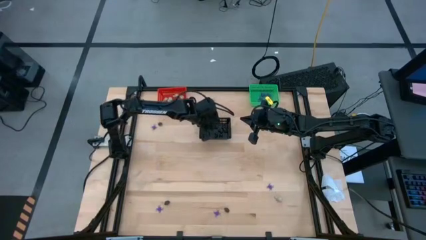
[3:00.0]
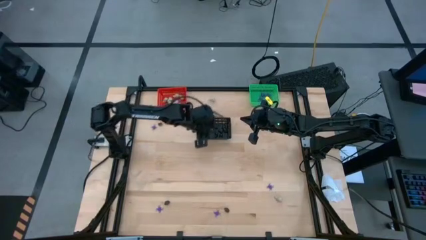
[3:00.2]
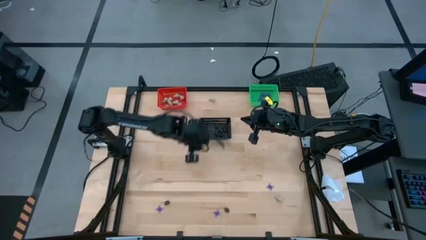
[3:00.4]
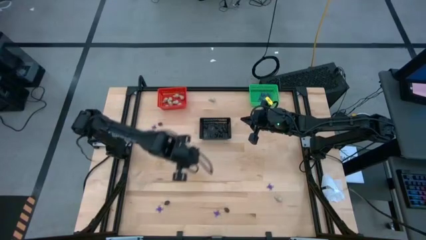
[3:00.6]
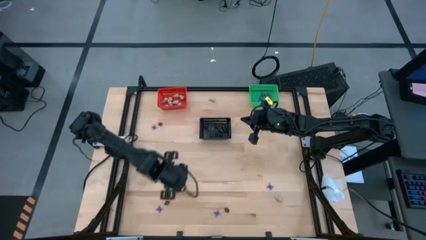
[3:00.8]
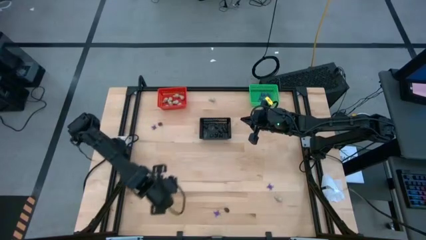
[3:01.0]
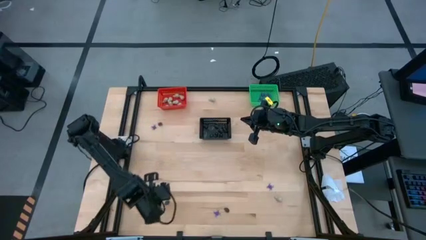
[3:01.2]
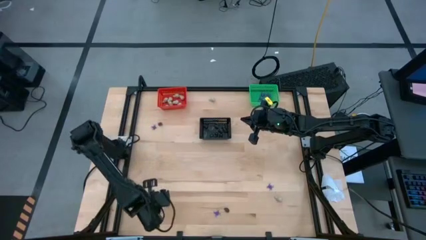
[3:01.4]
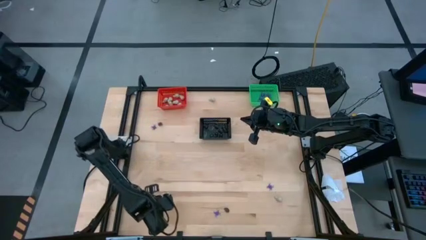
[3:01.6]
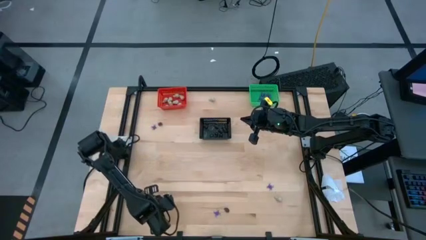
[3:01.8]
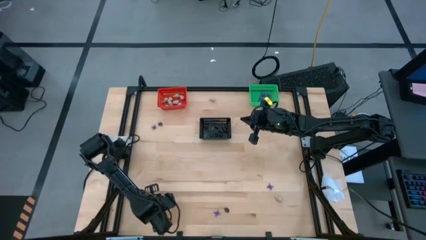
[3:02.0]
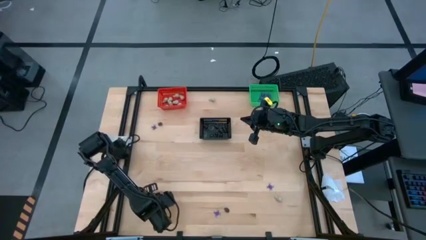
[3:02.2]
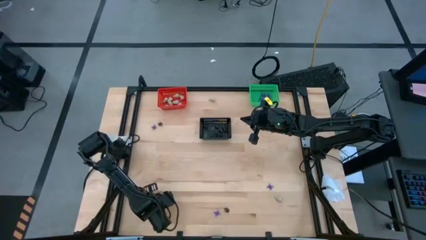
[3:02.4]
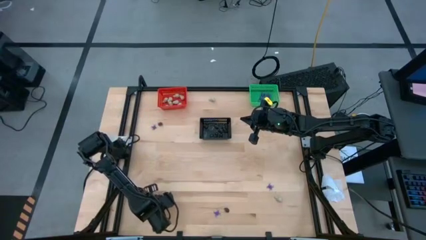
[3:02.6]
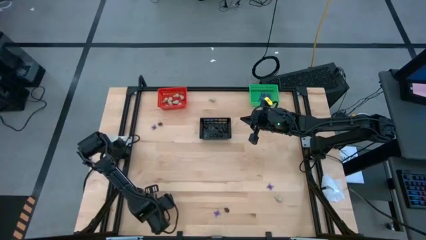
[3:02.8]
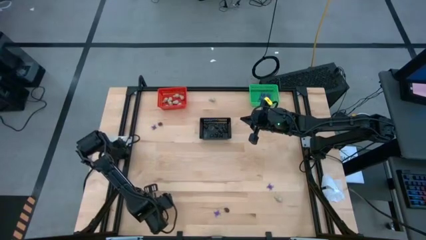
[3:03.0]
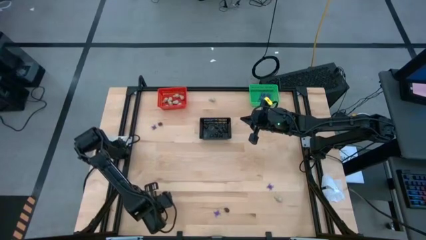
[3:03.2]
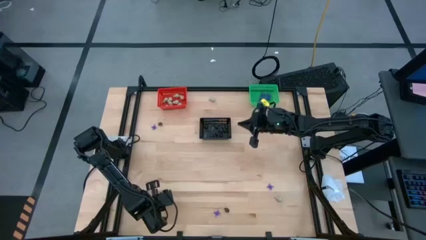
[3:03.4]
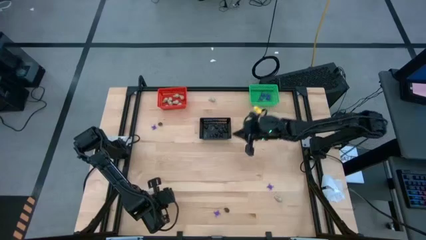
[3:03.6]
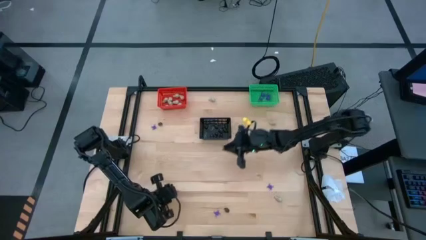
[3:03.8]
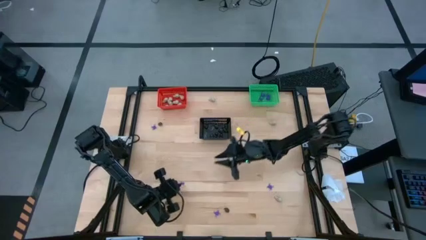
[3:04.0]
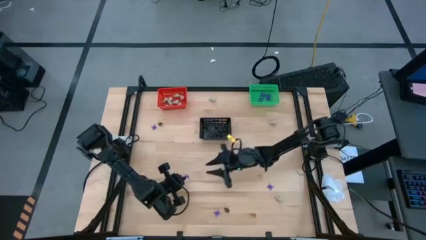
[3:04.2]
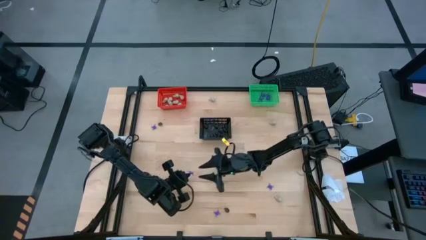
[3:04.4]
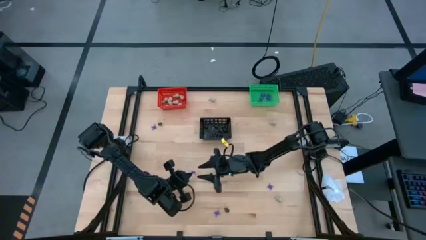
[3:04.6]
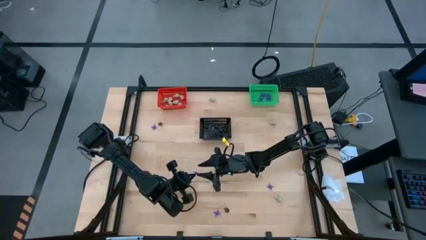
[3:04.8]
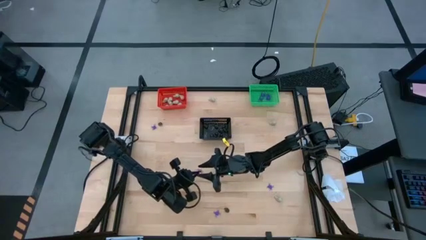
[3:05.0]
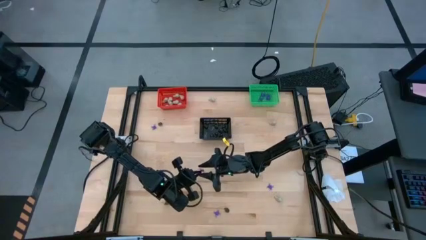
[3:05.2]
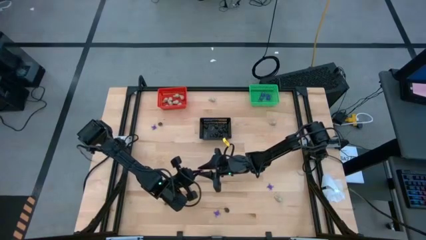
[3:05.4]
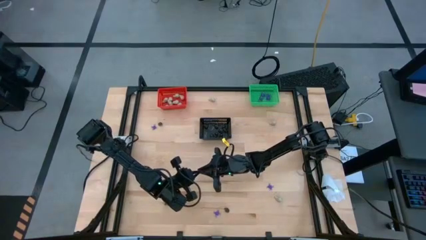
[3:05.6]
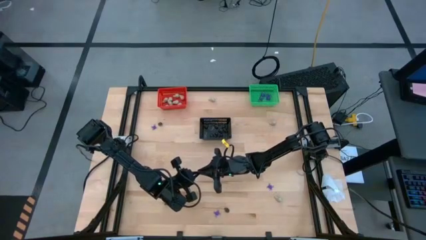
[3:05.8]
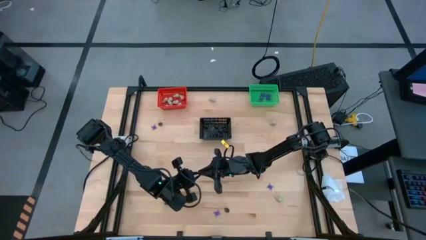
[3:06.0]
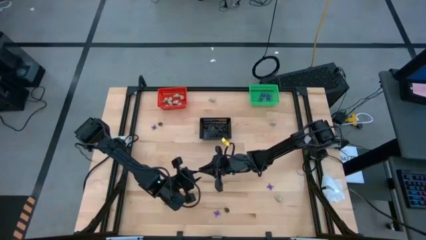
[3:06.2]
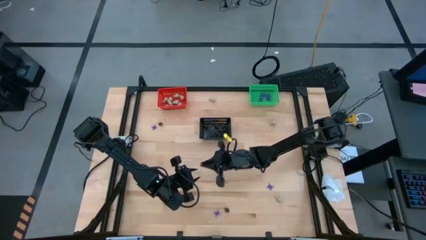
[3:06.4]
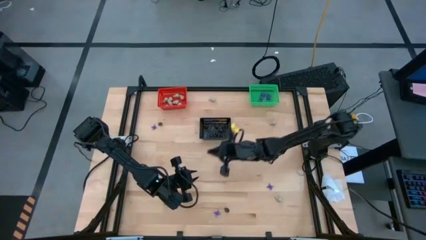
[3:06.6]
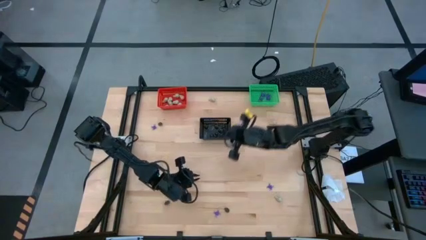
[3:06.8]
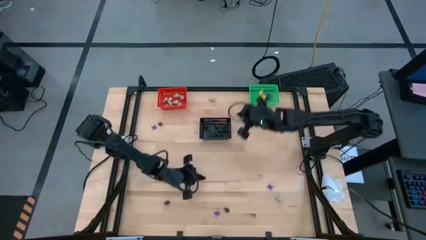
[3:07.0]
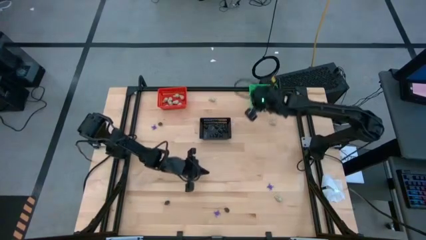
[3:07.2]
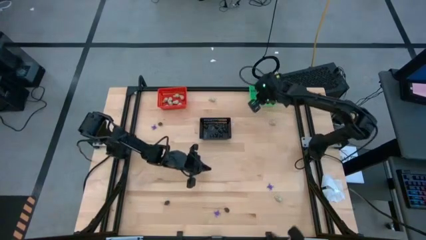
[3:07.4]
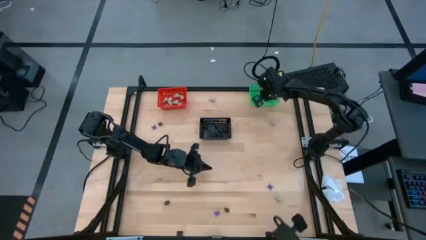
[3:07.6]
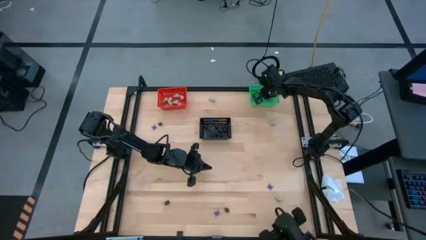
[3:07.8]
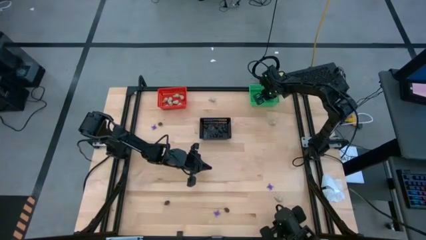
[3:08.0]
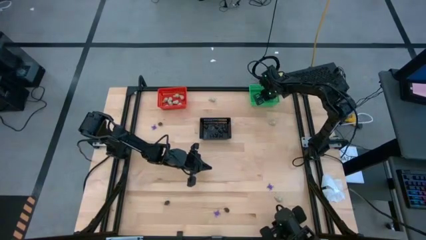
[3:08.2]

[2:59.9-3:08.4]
Task: Sort Halloween decoration
Put the violet spider toy into the green bin

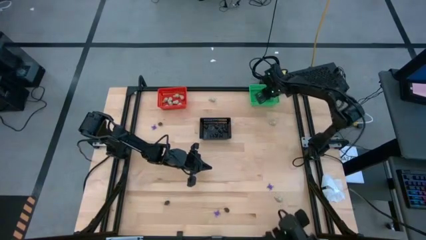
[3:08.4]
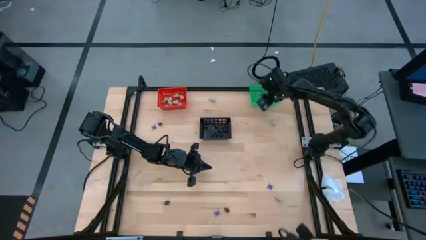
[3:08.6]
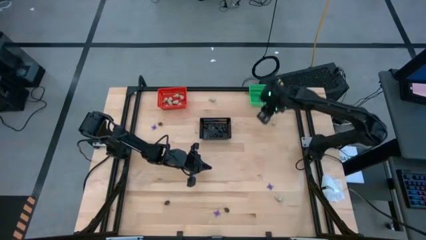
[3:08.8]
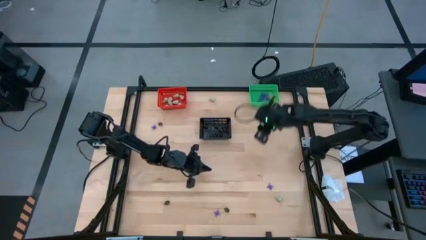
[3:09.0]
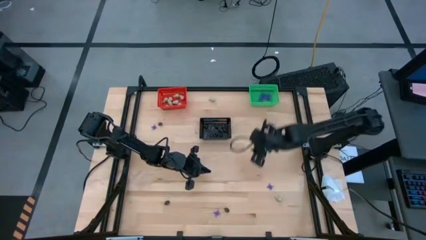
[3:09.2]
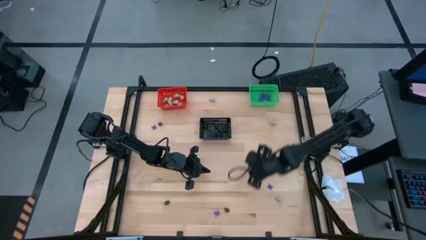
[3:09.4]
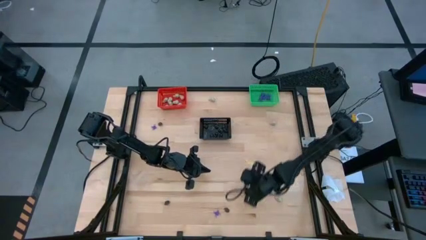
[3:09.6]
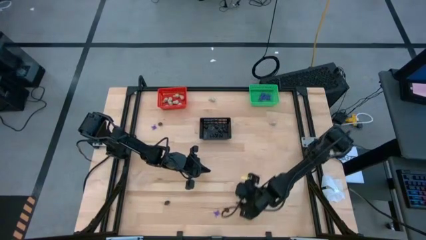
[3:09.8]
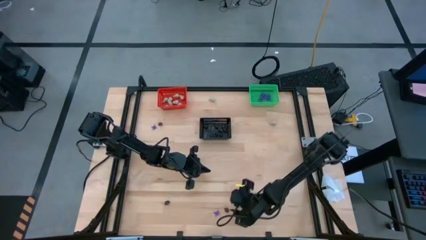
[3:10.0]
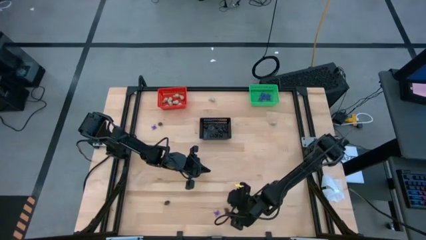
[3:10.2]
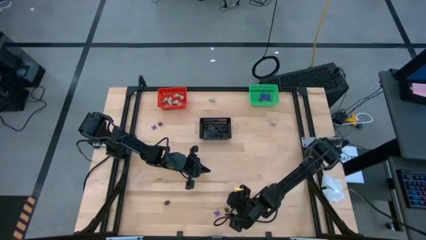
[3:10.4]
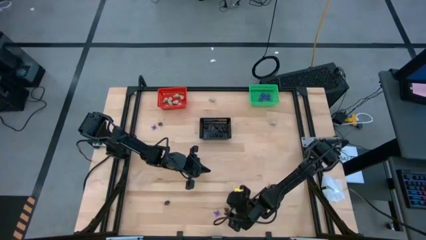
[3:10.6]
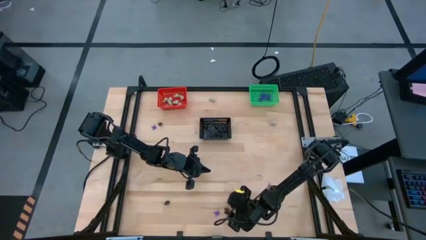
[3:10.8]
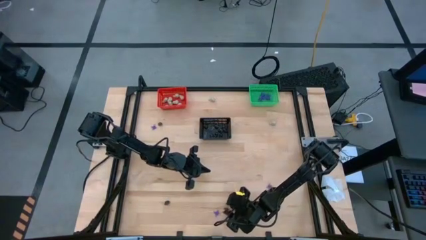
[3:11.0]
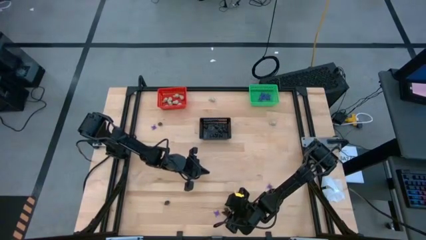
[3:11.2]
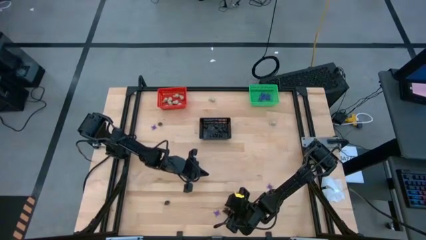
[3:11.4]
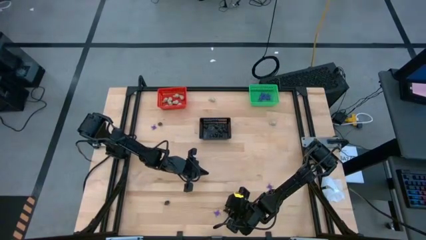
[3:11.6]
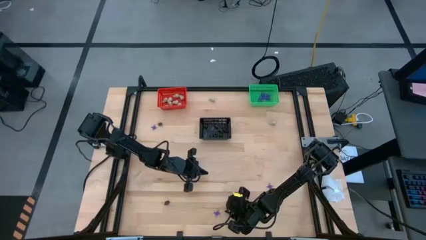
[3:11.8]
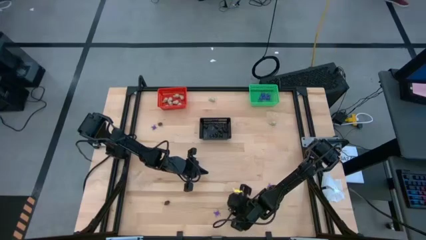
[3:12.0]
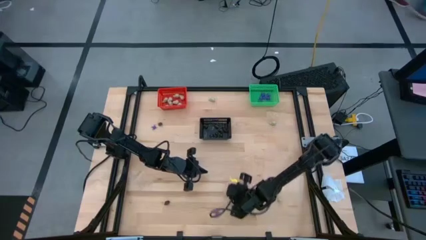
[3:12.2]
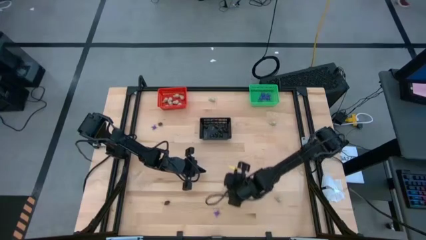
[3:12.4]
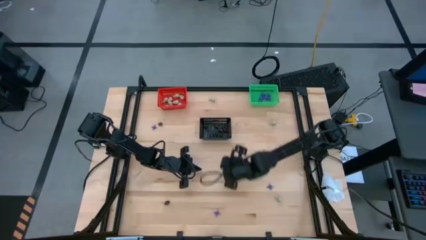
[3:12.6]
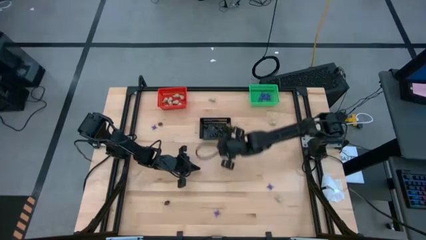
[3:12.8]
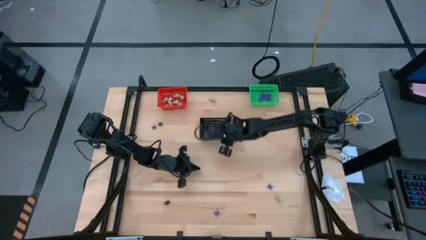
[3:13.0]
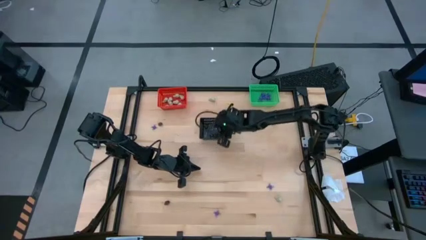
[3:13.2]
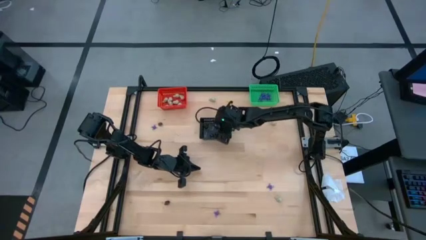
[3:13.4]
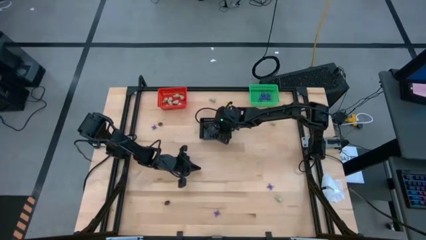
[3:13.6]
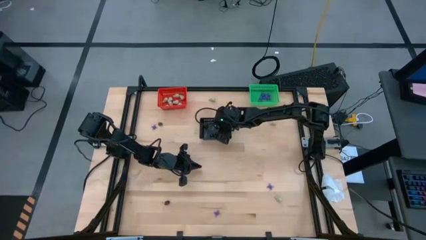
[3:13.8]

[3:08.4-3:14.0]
Put the black skull toy into the black bin
